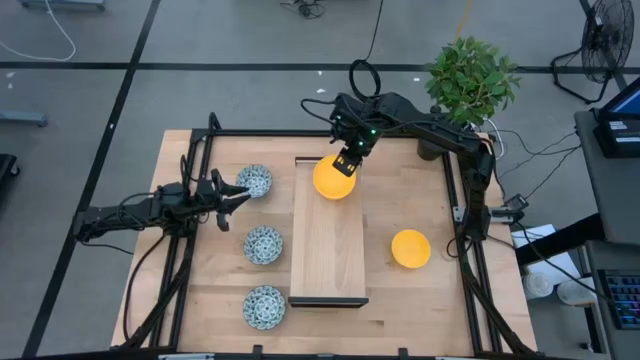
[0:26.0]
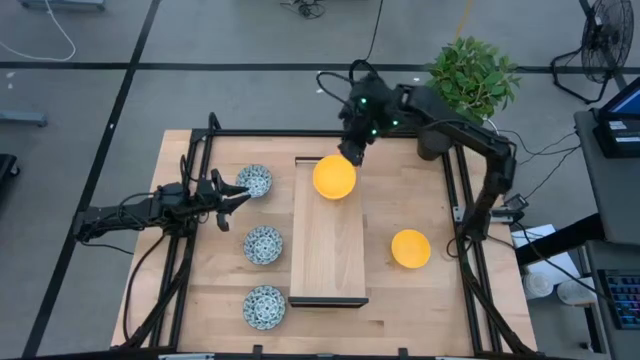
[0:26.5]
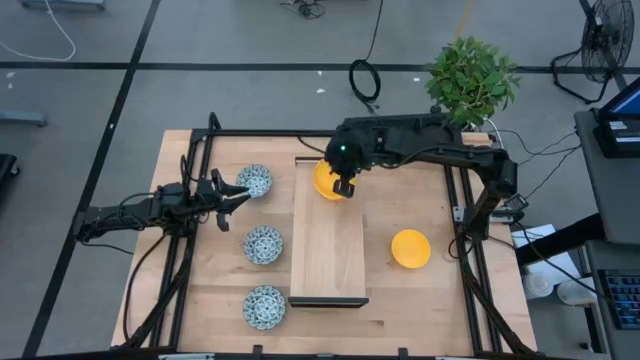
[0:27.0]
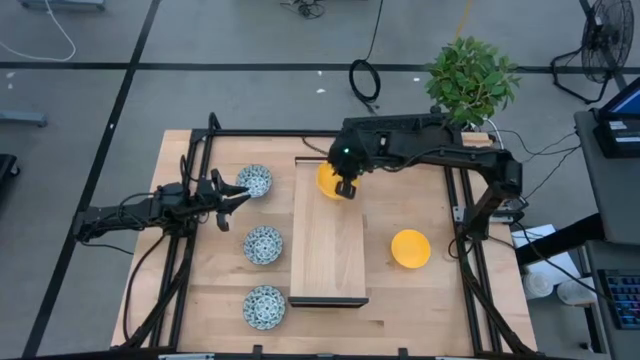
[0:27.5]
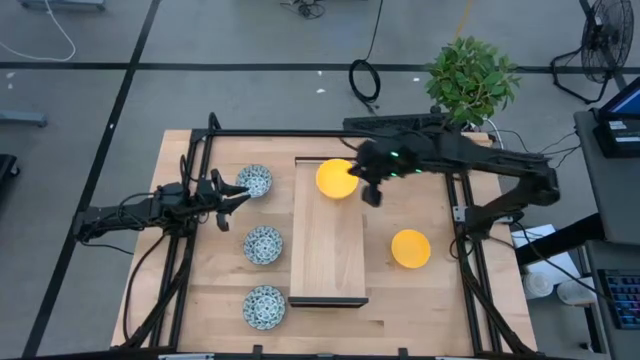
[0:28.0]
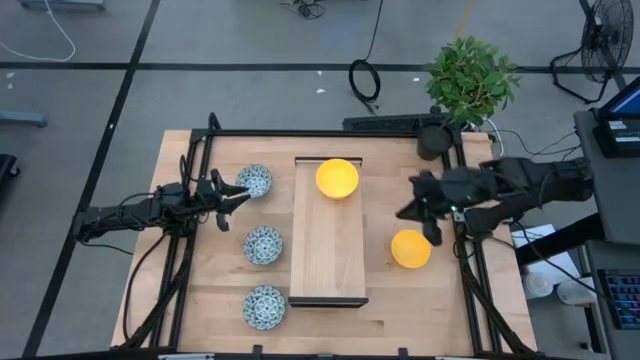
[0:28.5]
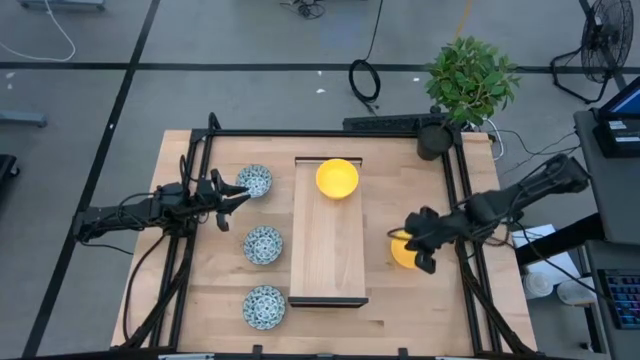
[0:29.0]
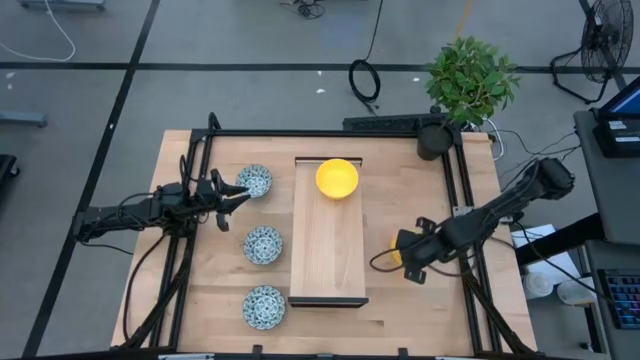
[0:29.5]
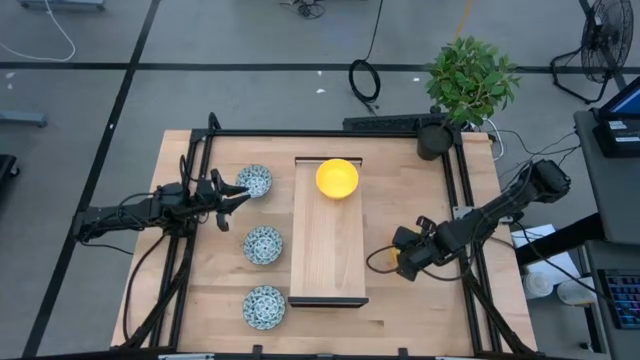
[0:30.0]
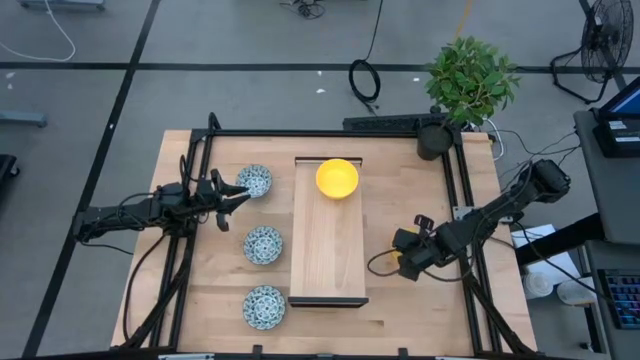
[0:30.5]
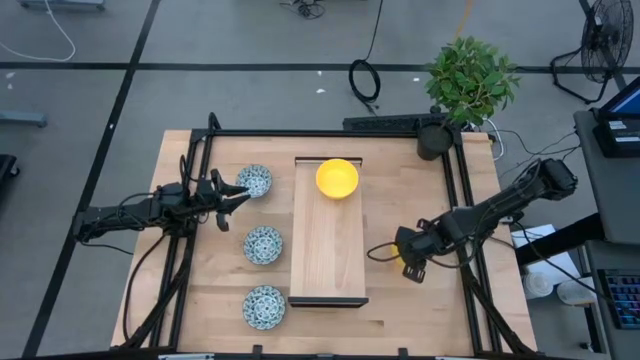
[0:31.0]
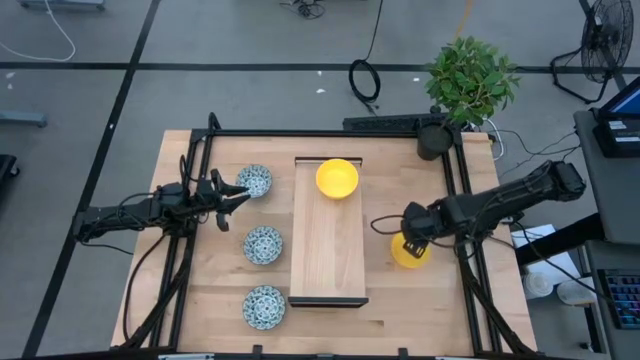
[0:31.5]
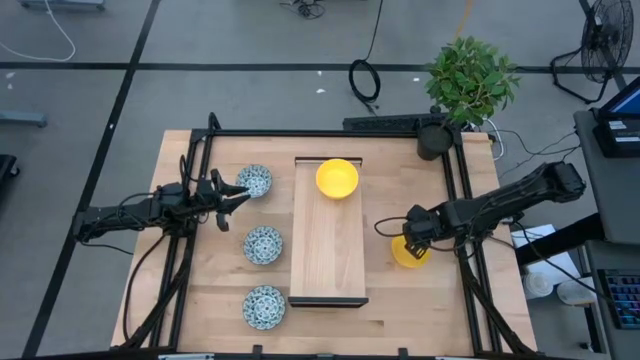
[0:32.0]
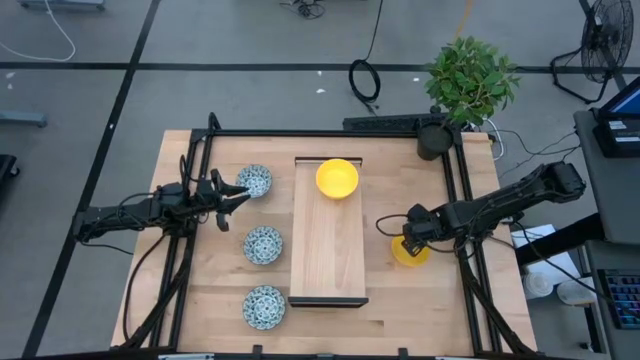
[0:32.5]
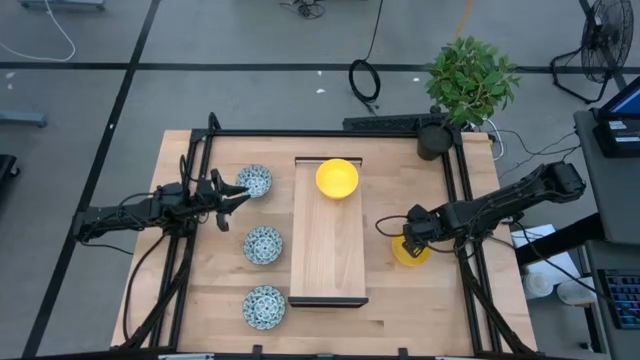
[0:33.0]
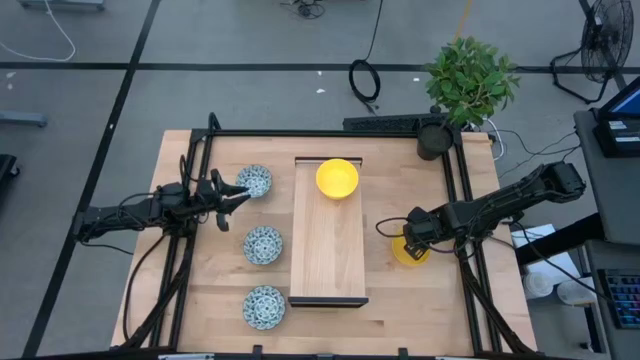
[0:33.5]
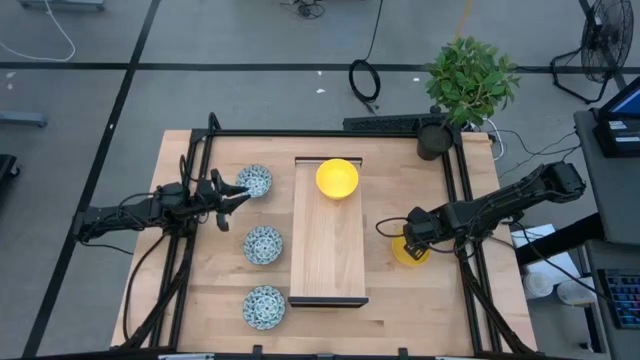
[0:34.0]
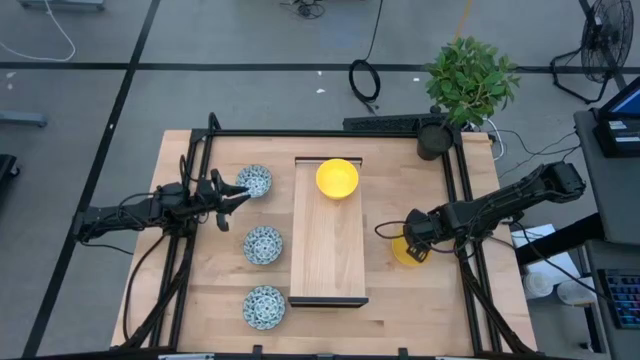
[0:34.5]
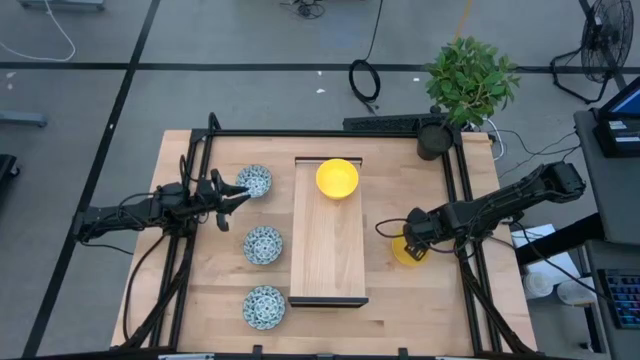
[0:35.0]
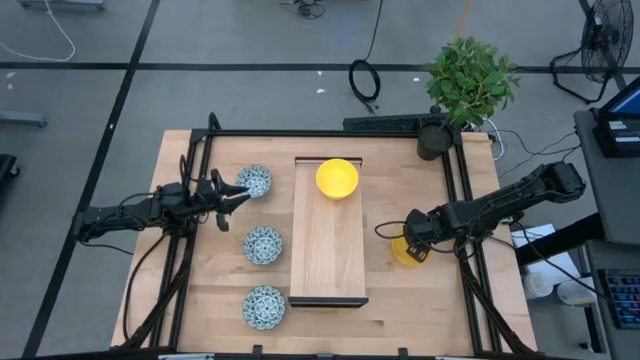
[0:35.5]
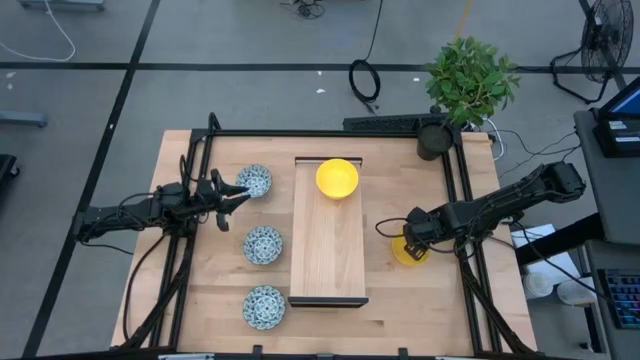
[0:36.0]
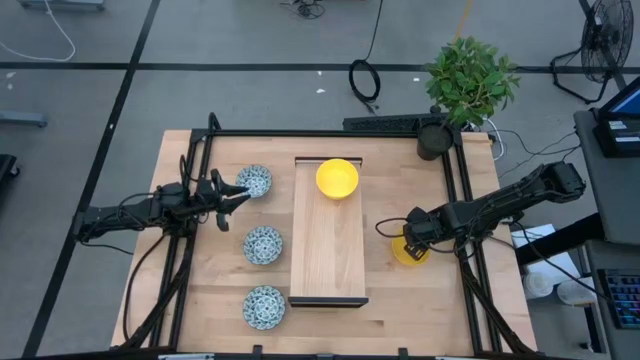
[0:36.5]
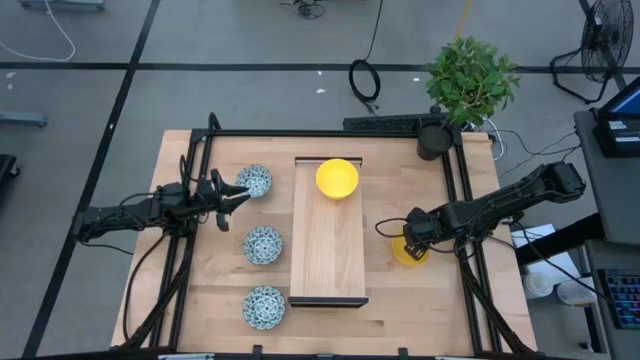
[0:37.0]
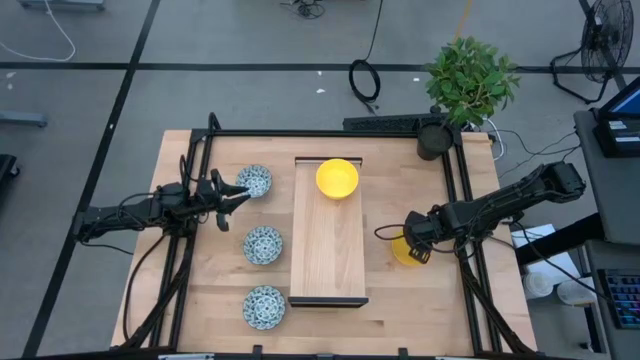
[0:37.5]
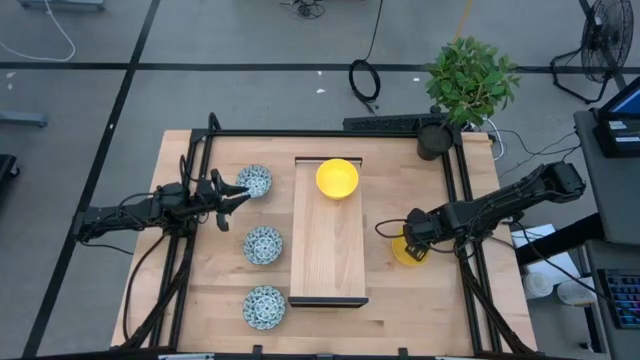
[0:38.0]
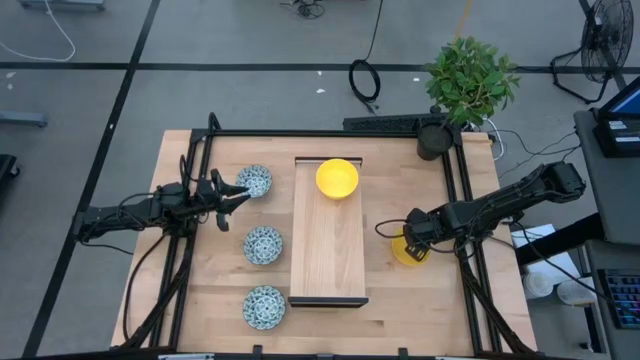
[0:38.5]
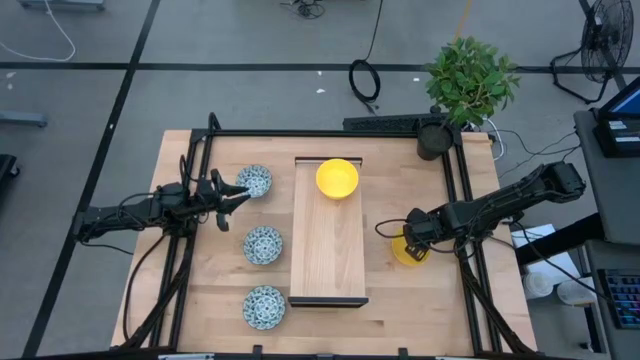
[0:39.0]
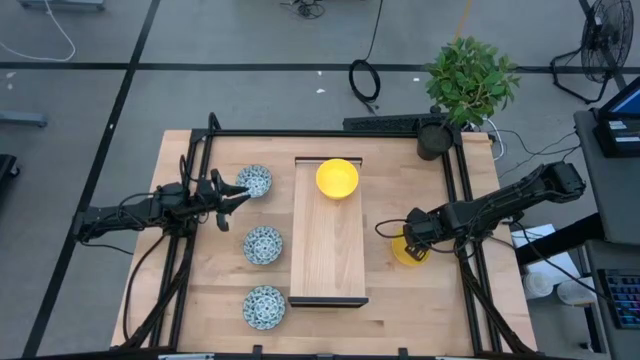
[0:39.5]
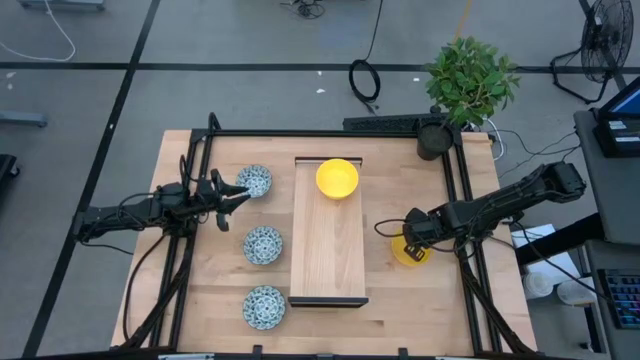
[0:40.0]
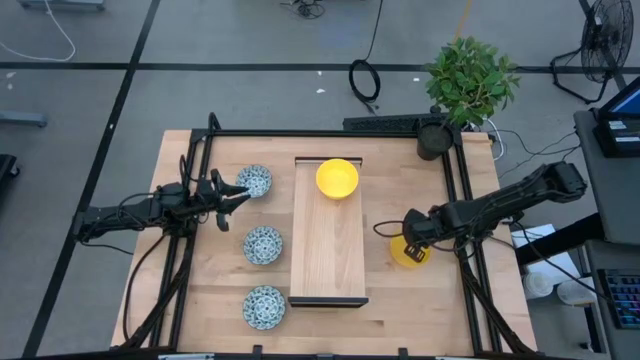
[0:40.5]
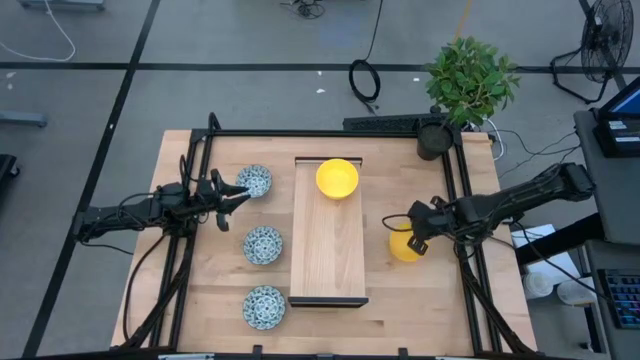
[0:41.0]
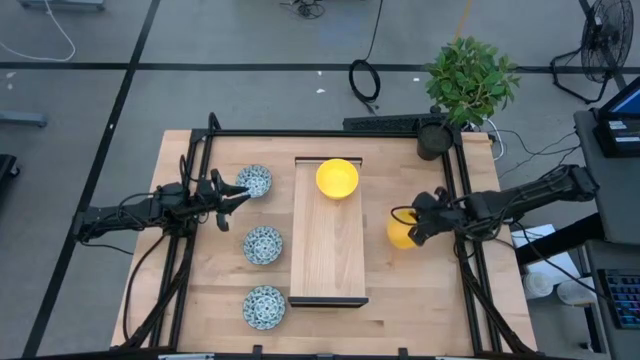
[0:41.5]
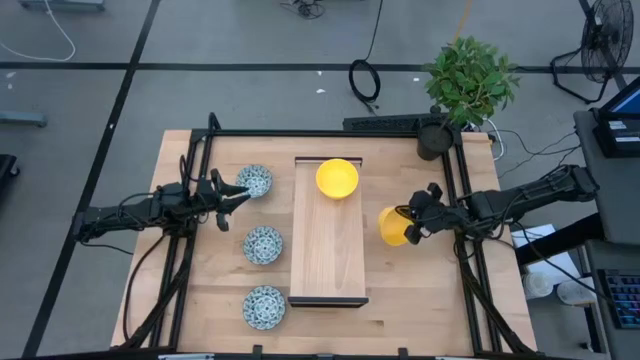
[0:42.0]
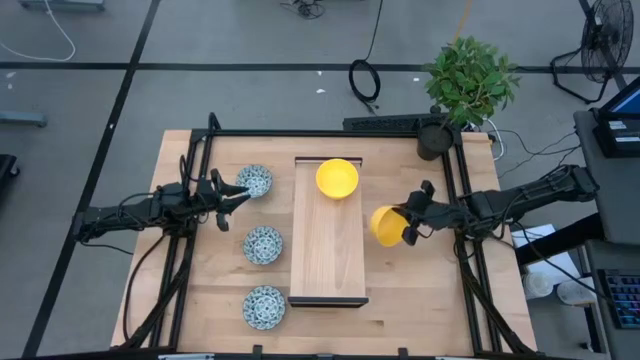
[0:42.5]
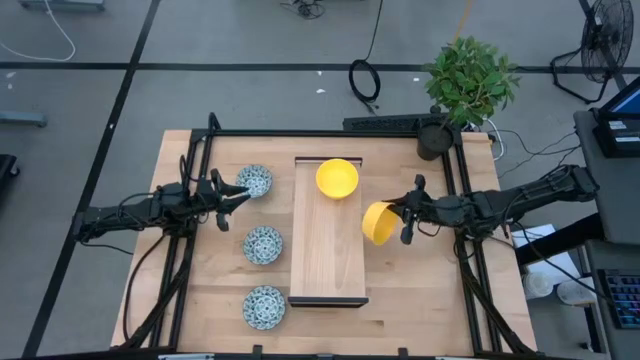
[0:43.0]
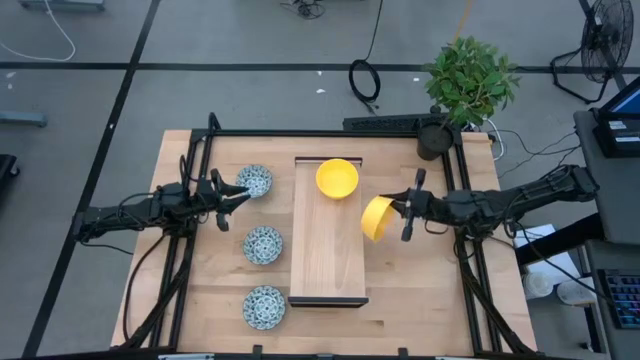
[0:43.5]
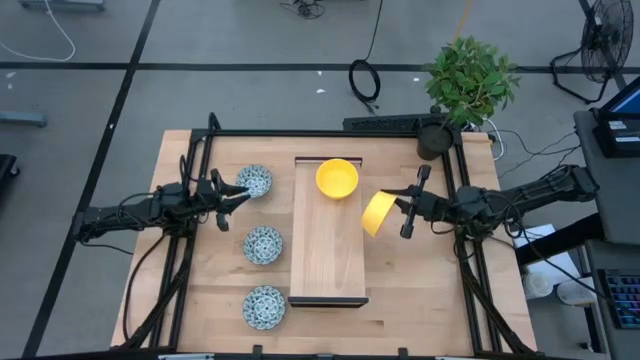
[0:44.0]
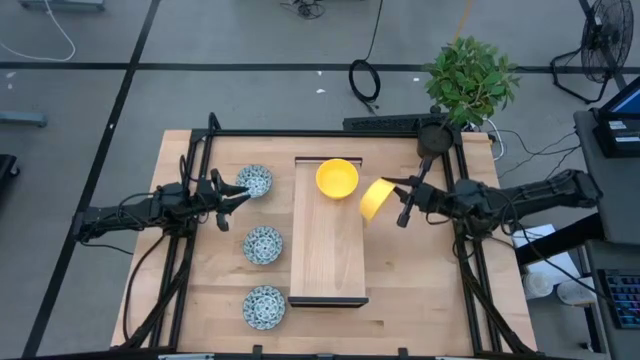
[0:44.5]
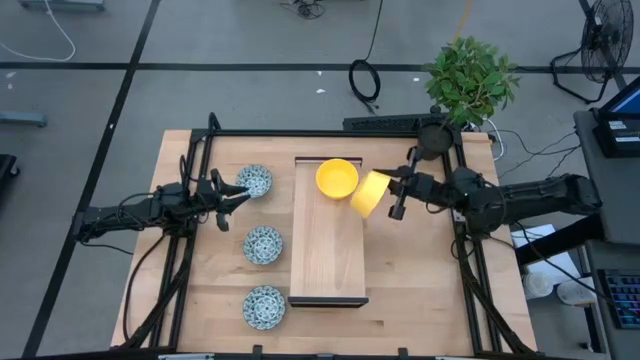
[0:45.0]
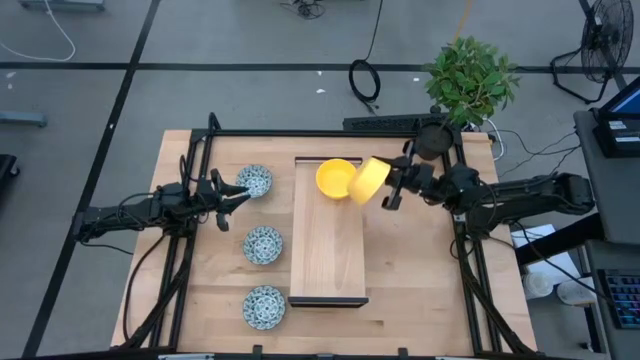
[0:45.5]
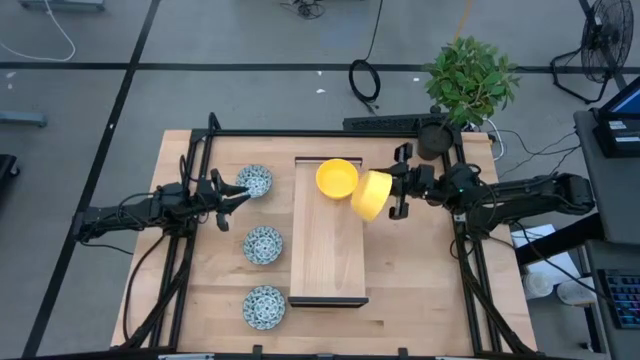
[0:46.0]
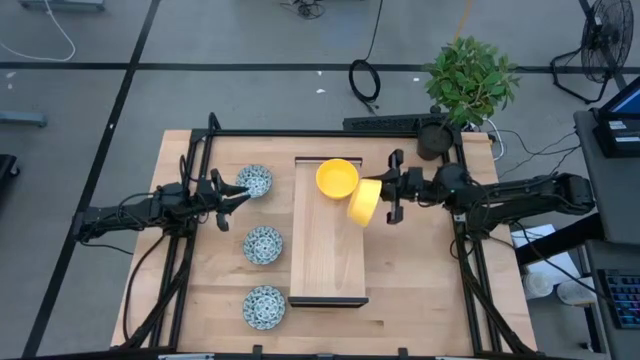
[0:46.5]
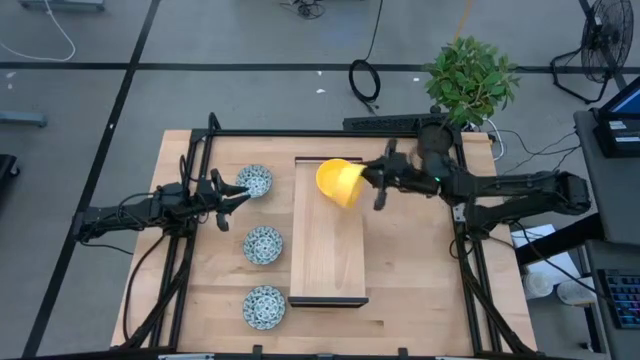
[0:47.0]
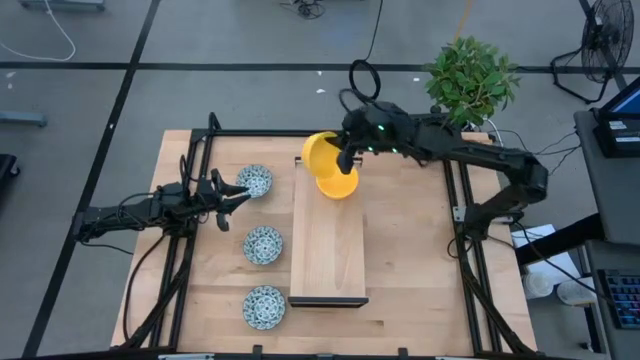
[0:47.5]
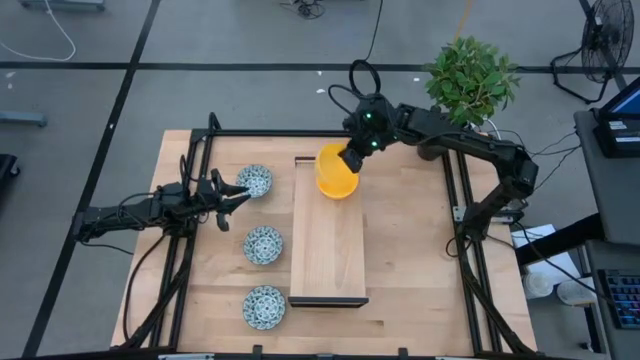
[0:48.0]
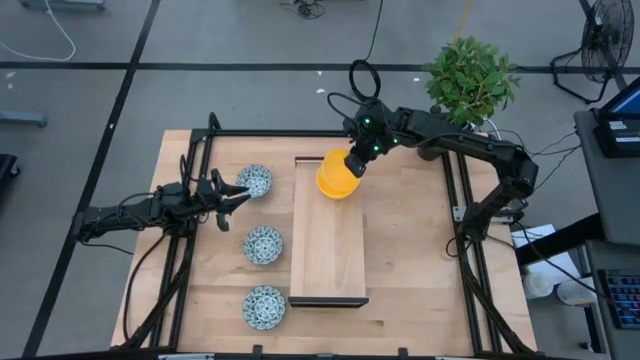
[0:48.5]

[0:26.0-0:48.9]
Task: Pick & Place Mini bowls
Stack the yellow bowl on top of the yellow bowl on the shelf
